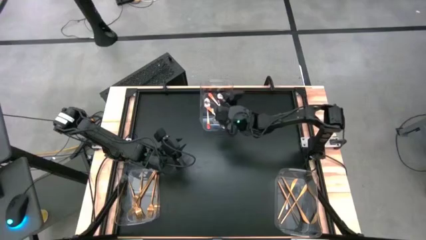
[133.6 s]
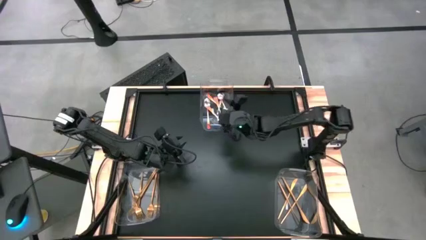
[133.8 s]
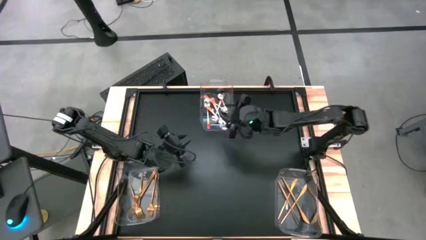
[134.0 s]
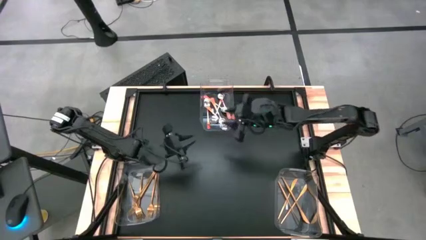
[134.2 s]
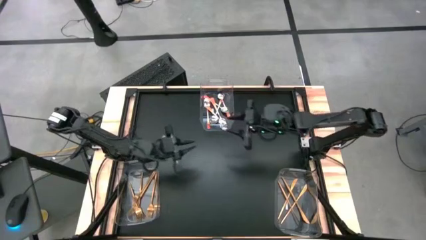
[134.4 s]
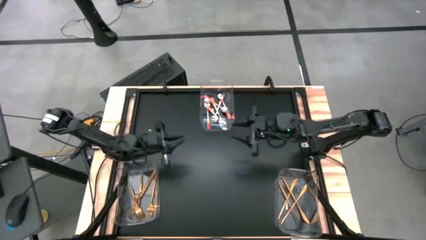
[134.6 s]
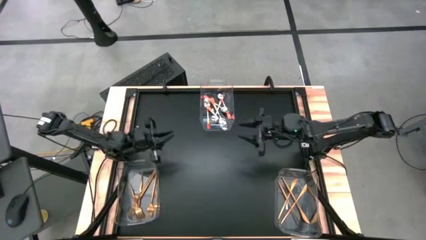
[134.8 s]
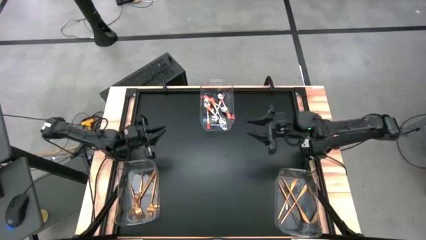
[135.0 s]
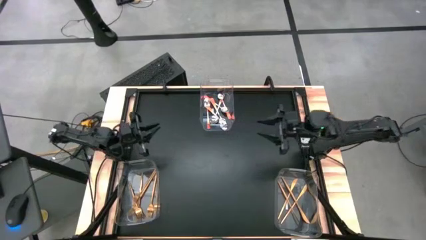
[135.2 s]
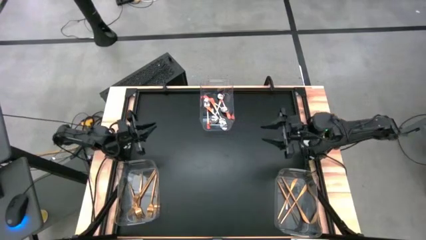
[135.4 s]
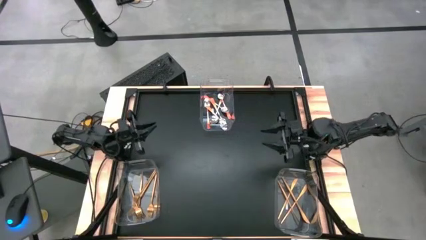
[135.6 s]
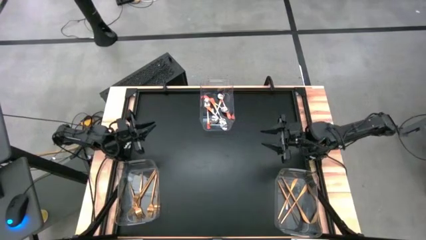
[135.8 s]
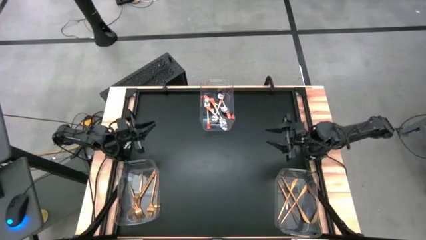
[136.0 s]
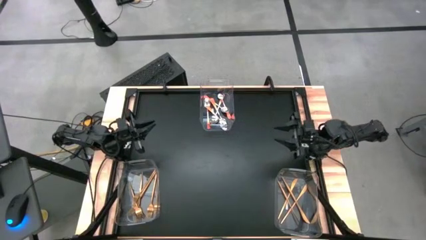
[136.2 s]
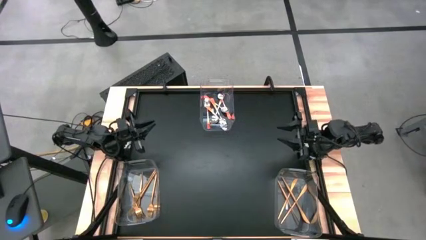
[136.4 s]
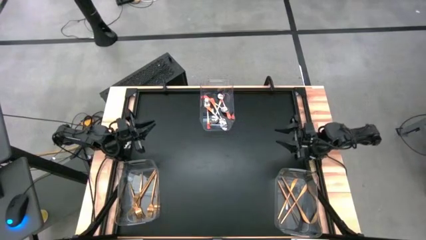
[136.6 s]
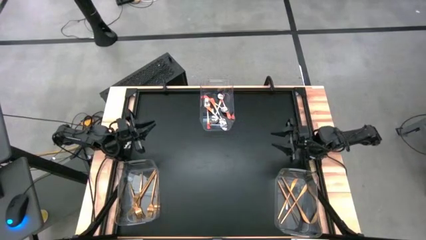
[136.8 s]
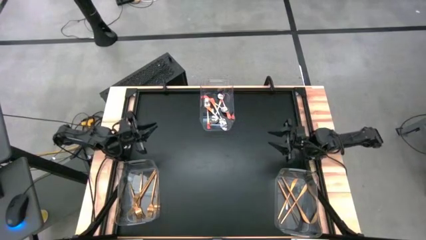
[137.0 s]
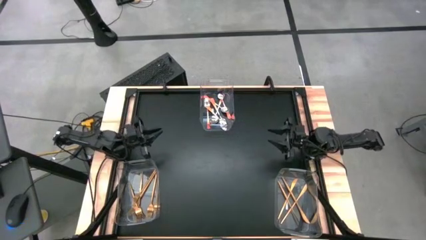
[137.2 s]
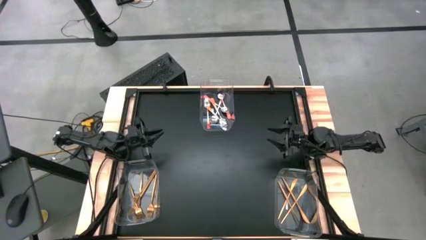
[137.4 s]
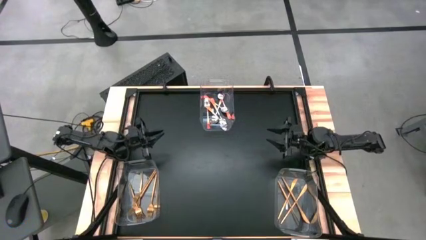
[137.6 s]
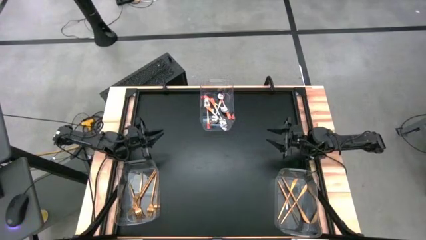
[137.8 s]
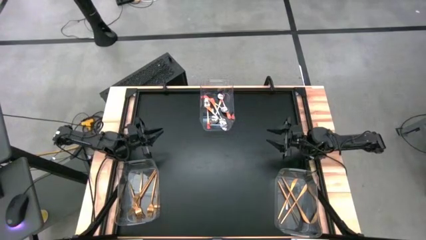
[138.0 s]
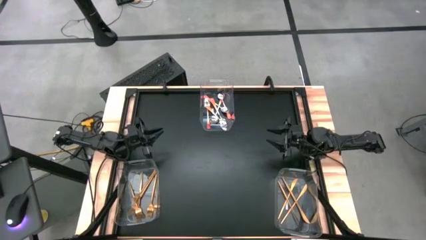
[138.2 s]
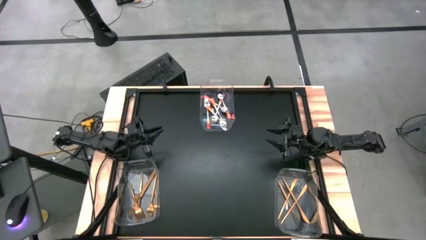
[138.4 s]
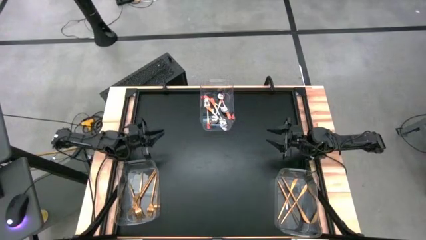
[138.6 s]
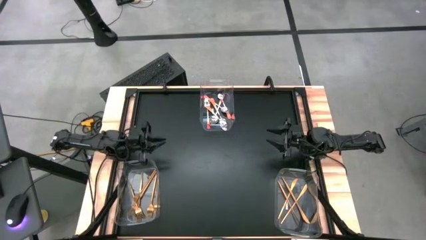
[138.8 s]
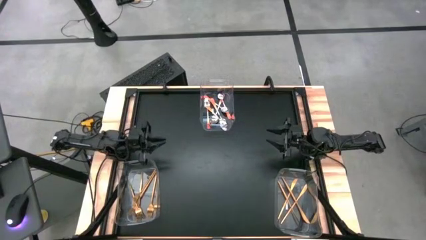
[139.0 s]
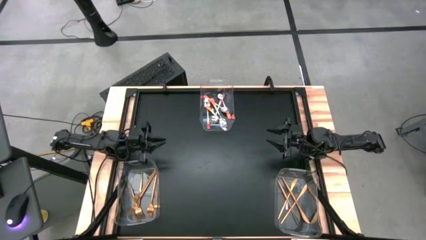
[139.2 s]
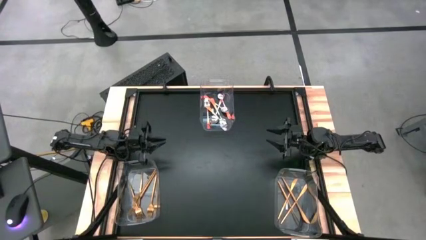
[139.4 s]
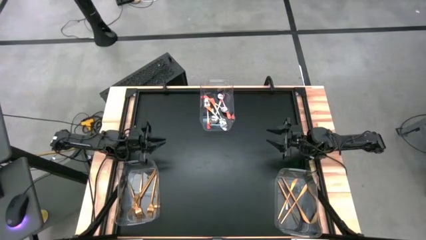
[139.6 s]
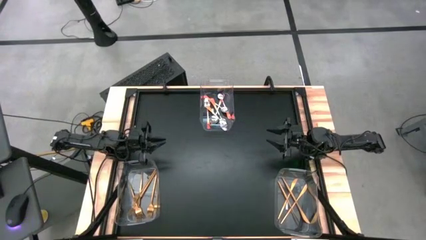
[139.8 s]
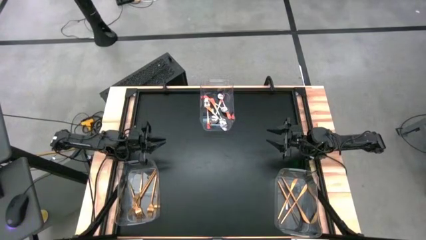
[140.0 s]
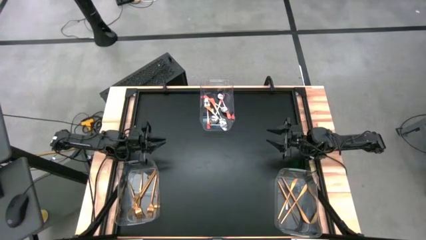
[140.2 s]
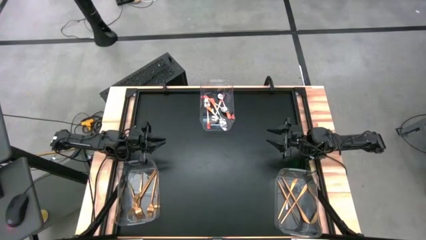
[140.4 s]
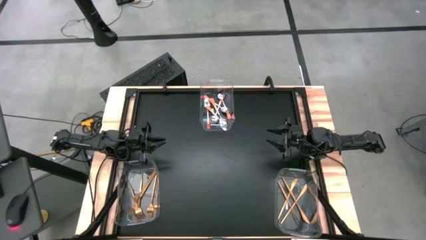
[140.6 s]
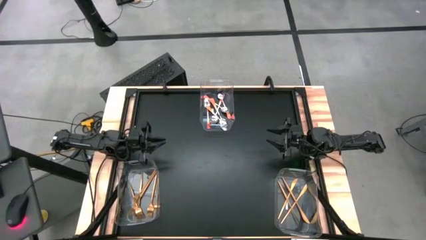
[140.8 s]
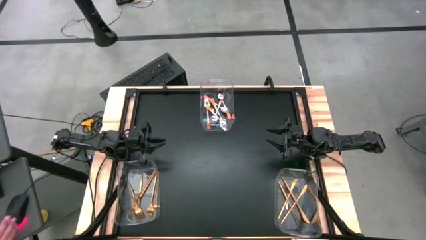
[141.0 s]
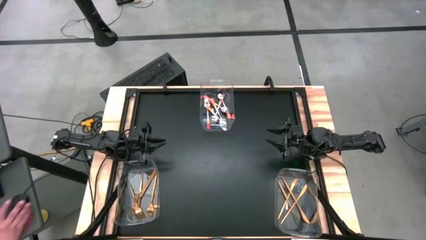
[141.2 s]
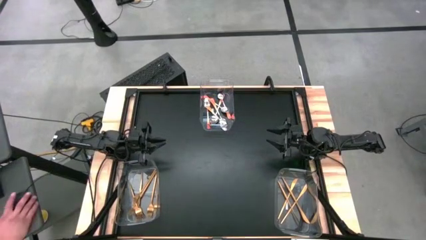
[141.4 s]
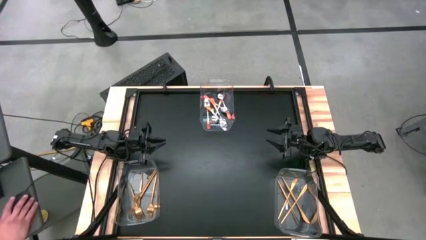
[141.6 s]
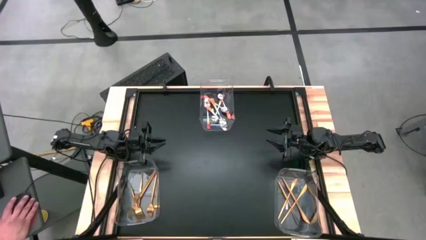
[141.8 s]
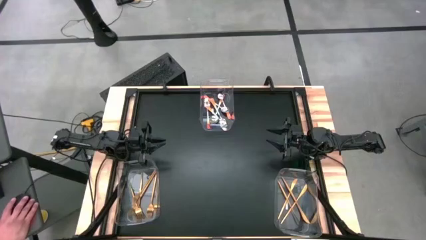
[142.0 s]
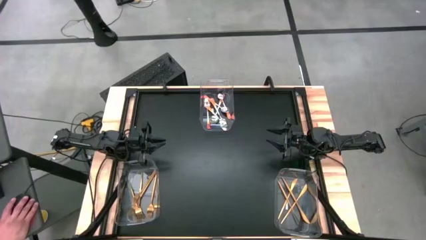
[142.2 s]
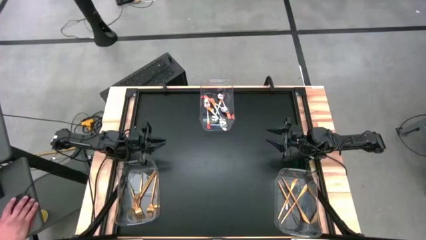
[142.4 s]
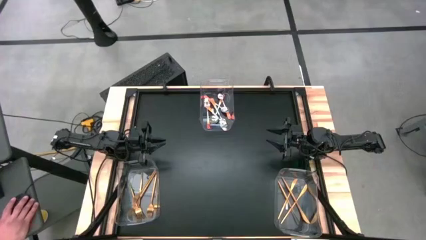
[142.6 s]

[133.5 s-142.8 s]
Task: Sort silverware by color (type)
Return to Home Position

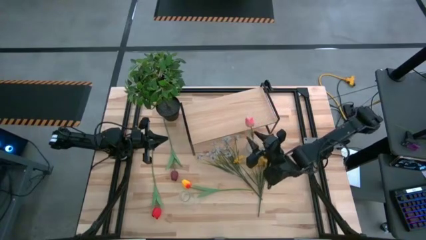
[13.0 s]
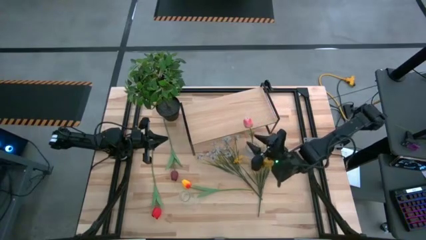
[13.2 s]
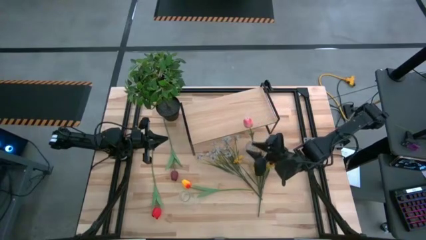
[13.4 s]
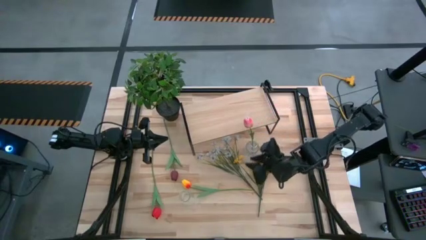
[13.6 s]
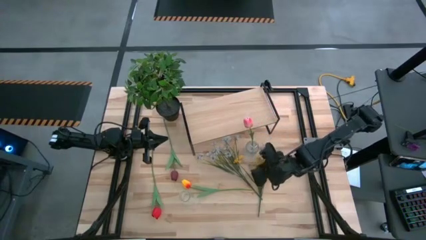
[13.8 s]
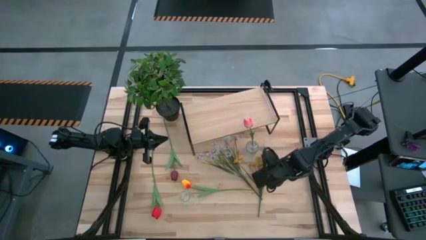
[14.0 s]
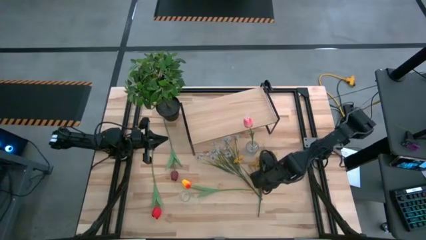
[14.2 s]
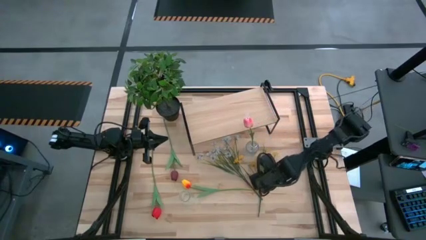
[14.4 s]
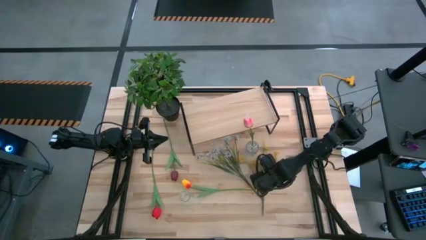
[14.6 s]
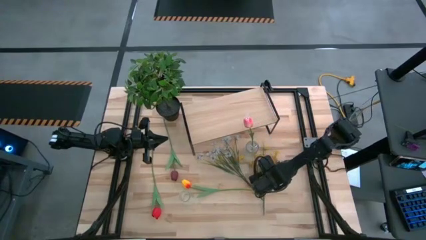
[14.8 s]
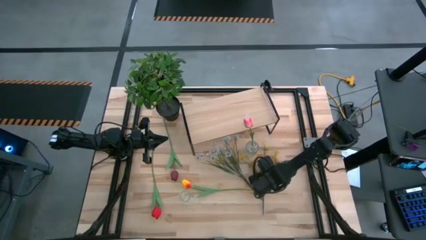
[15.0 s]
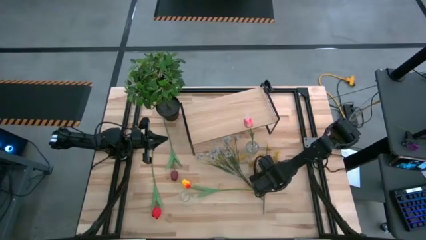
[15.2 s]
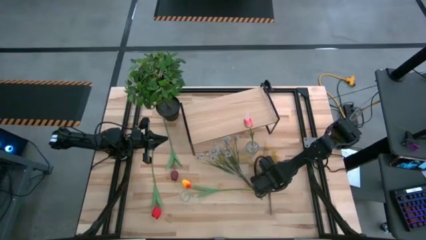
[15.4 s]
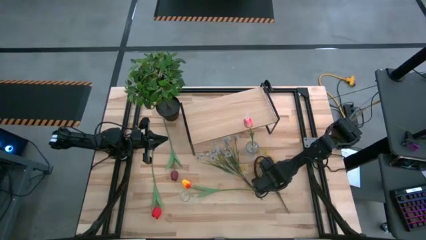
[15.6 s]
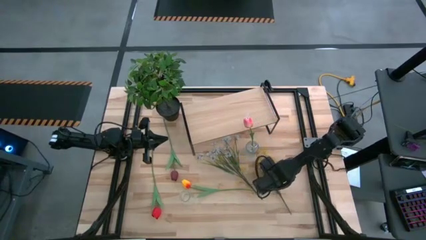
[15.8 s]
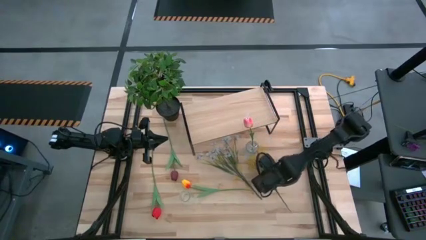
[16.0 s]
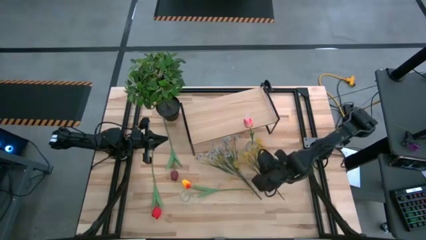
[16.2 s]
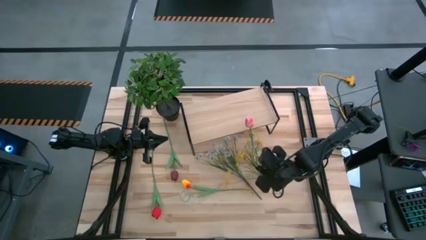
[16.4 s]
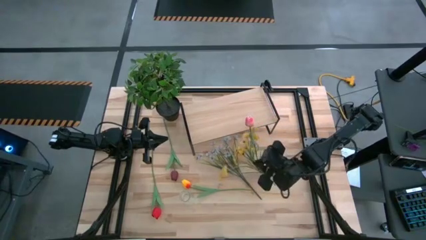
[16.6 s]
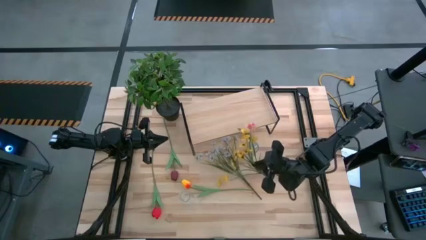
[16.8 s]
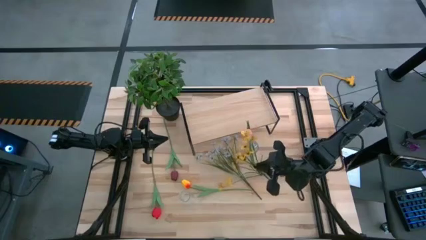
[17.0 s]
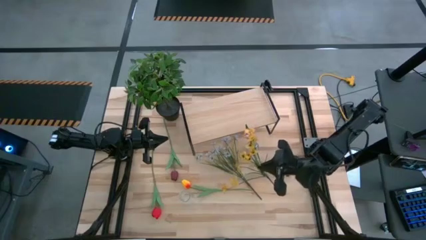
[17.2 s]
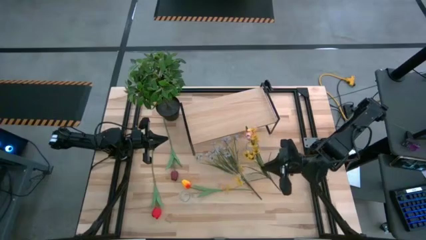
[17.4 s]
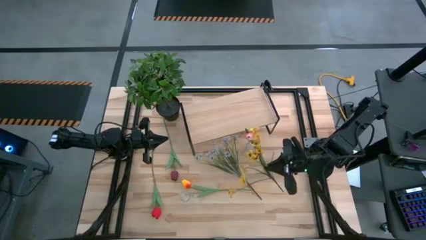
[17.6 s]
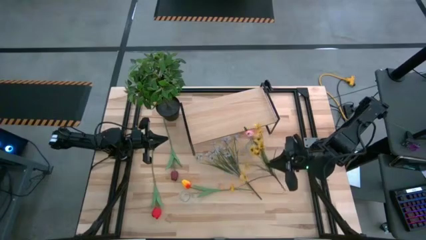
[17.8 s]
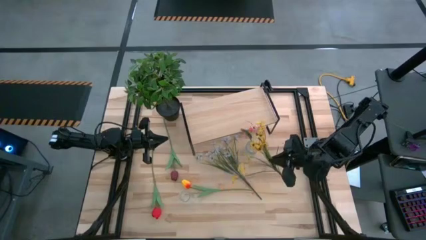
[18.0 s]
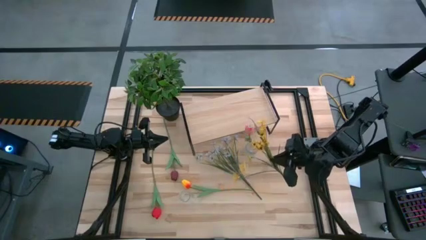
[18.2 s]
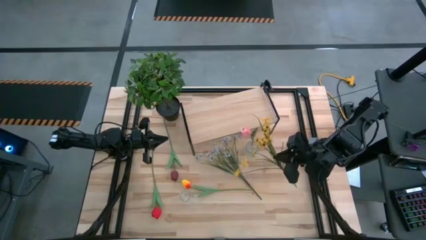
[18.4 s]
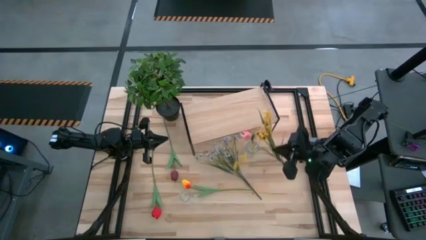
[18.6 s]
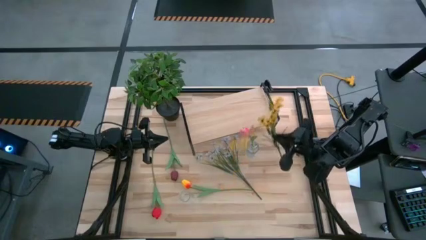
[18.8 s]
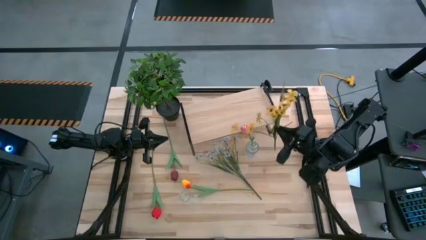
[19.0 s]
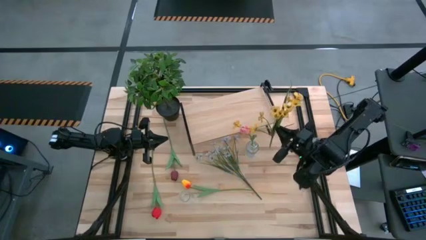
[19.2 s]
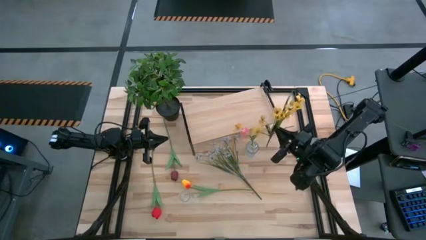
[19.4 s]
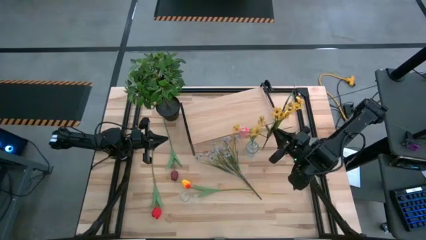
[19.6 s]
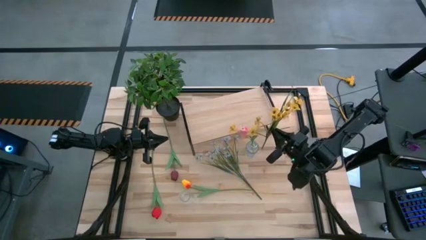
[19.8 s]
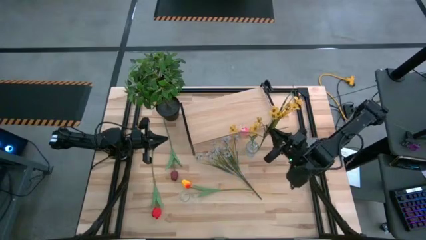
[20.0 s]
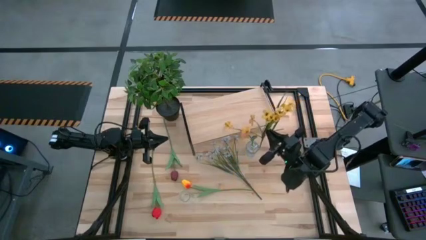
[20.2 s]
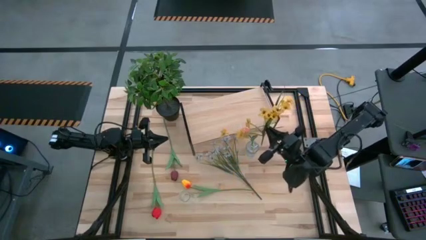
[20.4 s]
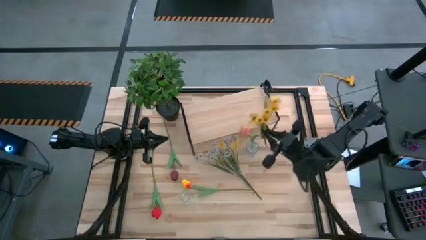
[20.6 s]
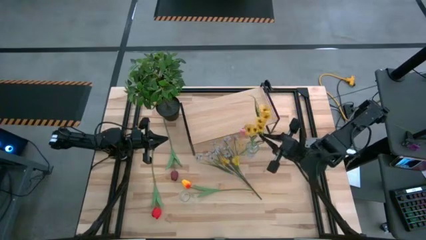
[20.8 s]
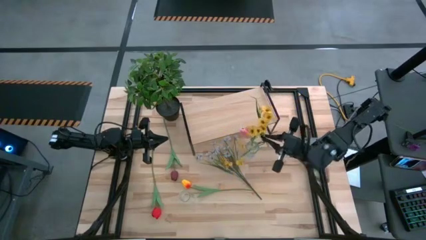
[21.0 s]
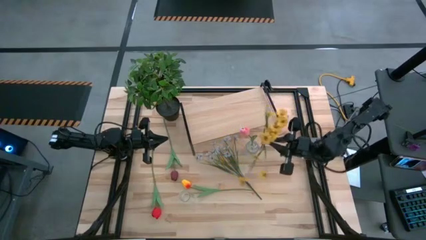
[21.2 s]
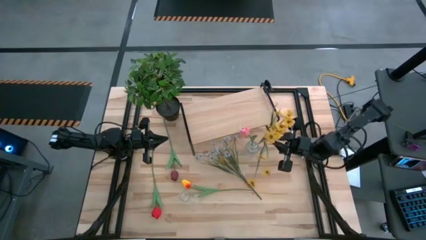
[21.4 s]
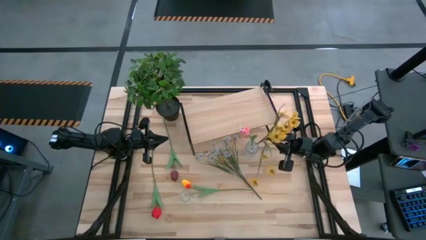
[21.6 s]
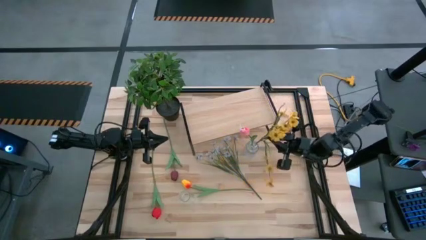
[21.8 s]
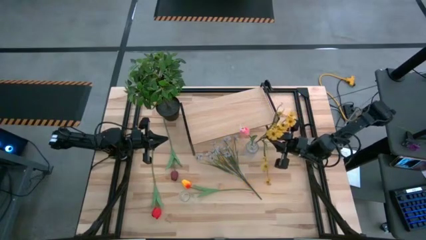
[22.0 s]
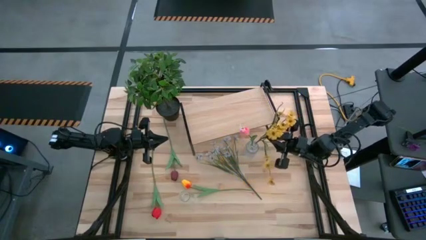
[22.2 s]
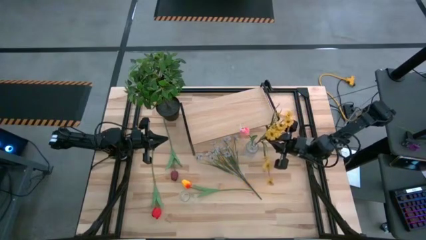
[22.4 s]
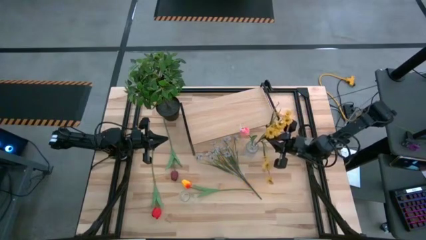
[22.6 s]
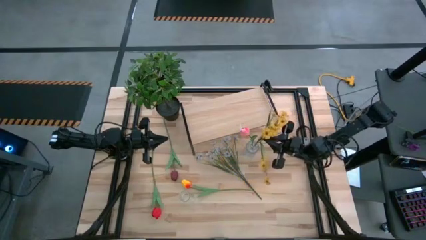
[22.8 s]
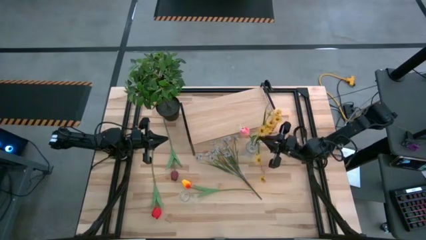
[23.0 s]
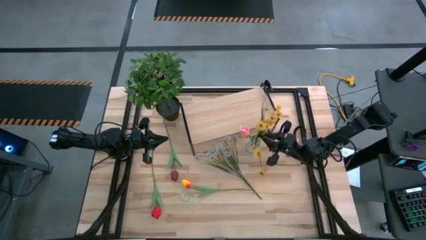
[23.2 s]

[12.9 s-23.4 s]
Task: Pick and place flowers into a vace then onto a shelf
Put the yellow flowers into the top transparent vase
